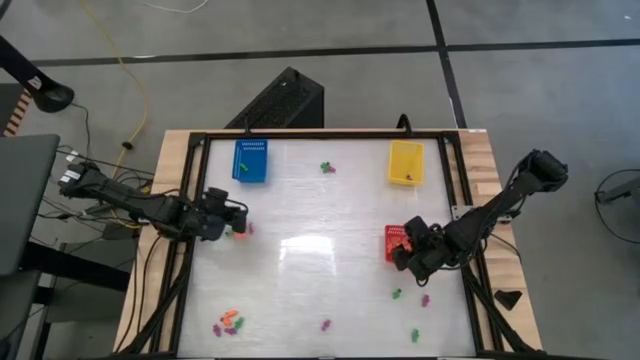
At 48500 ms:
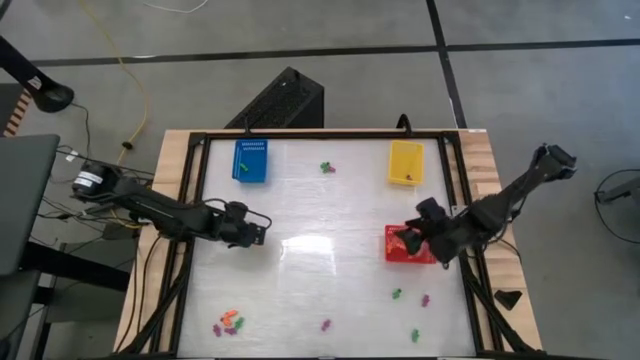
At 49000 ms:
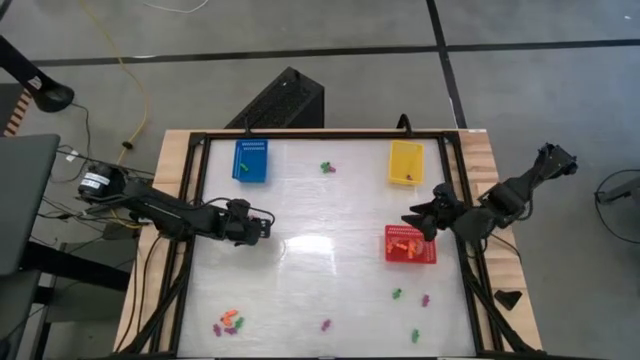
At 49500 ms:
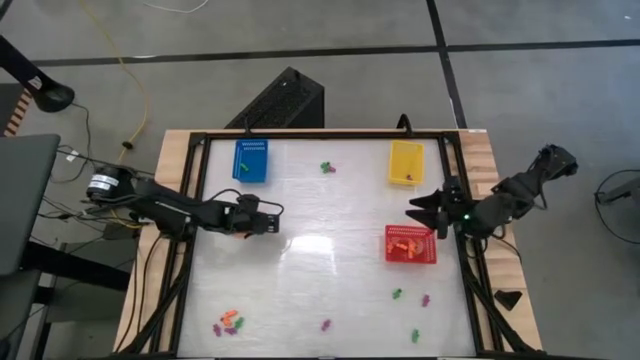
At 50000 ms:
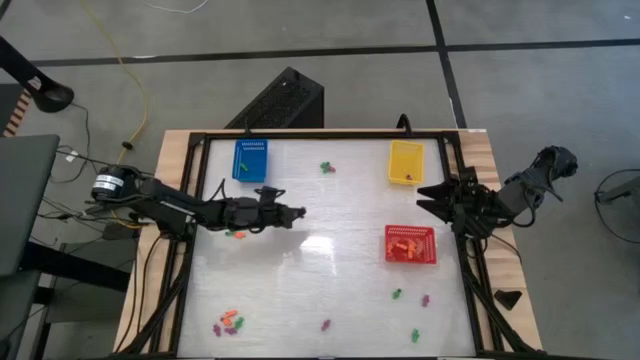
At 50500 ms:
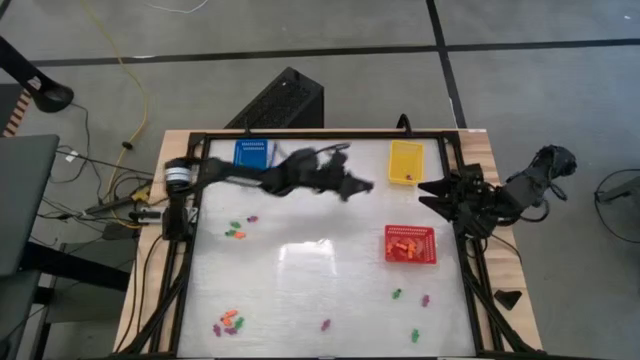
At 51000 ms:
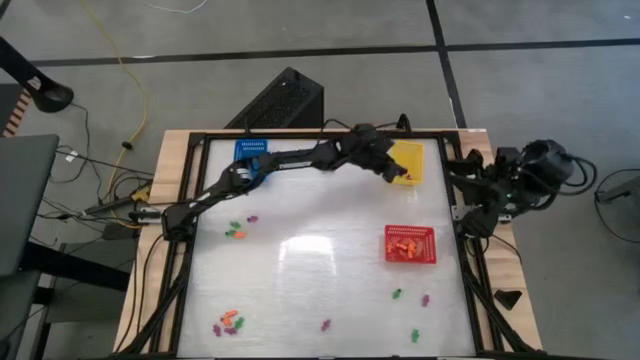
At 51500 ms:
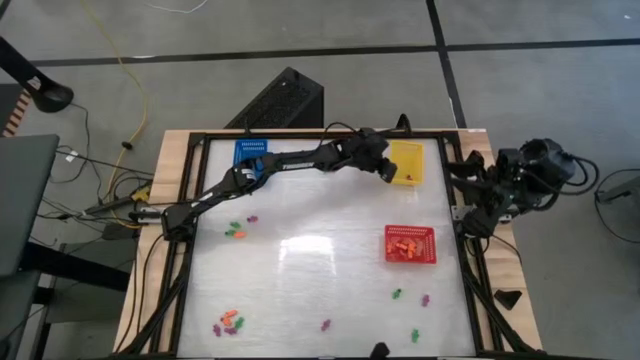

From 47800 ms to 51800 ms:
Task: Sort Halloween decoration
Put the purple skeleton toy into the yellow bin

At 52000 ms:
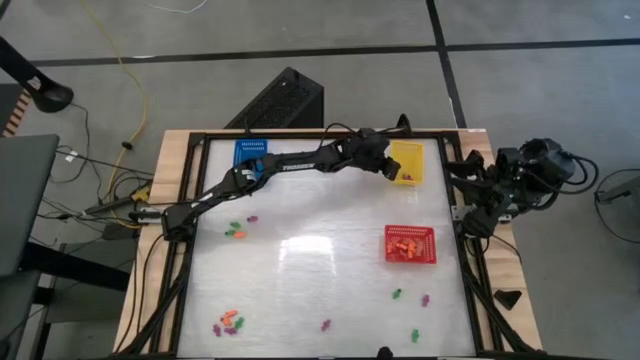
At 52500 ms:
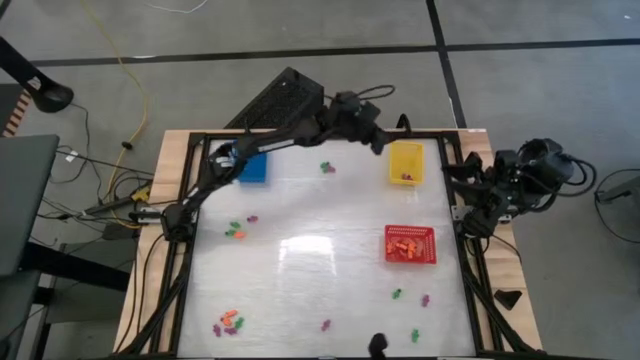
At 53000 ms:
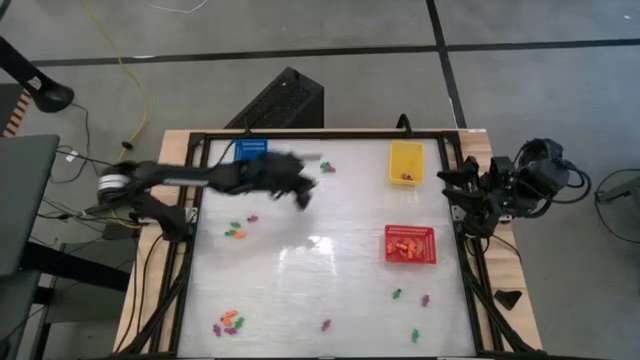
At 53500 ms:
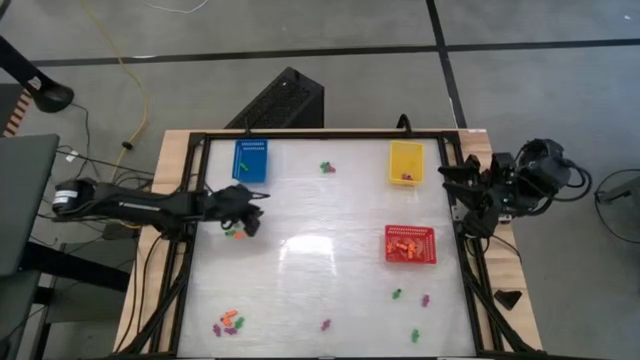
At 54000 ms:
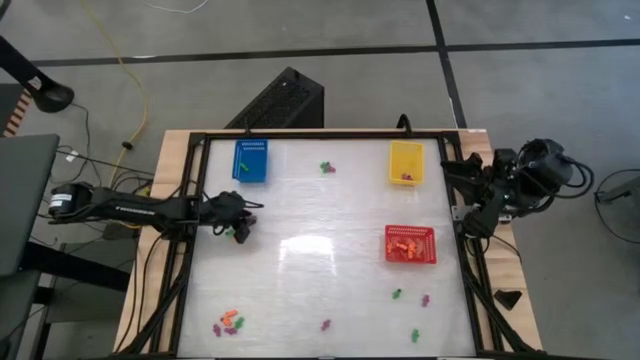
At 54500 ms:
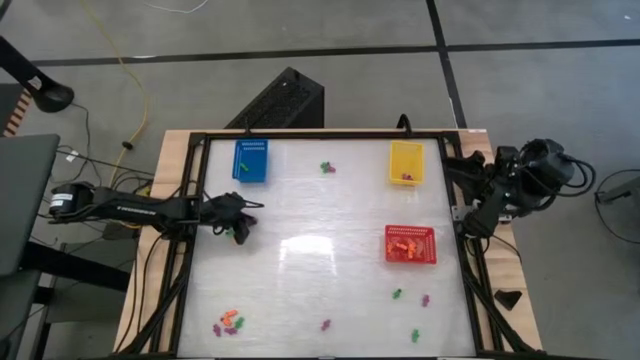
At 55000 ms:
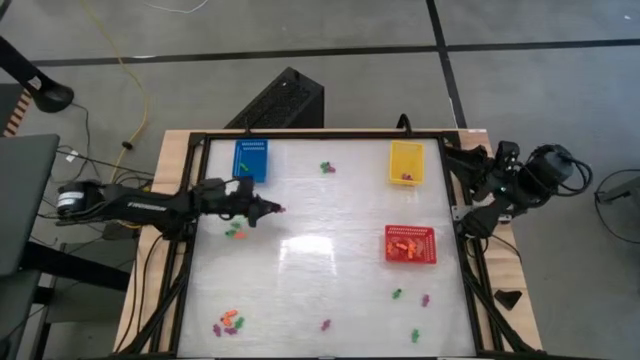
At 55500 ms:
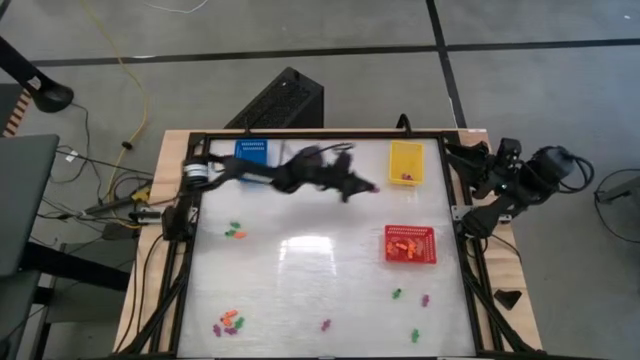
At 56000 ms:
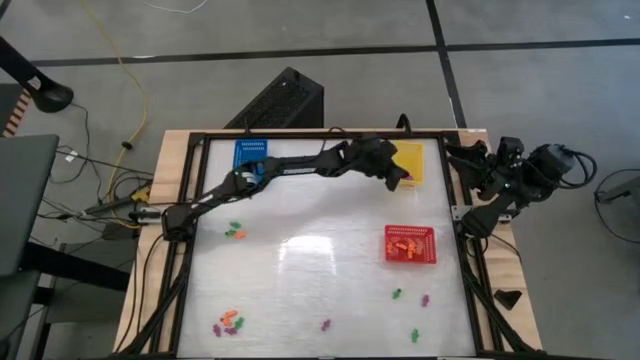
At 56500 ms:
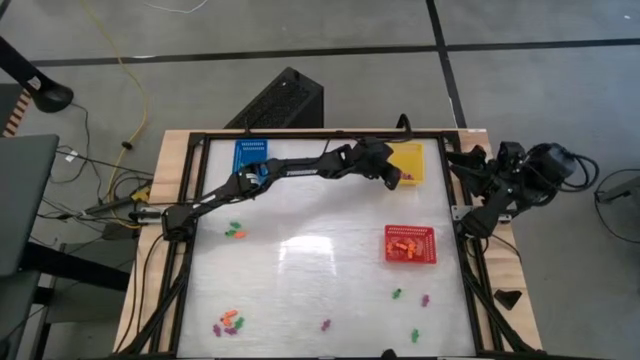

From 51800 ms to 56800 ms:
Put the purple skeleton toy into the yellow bin

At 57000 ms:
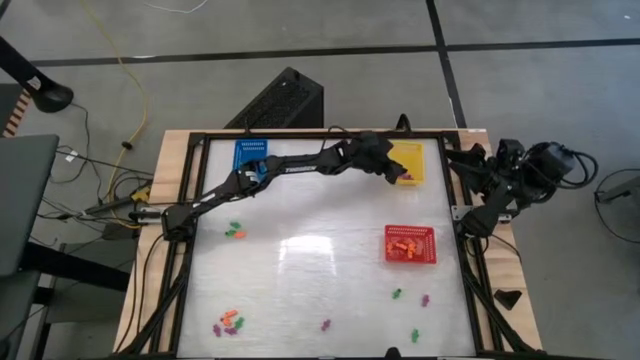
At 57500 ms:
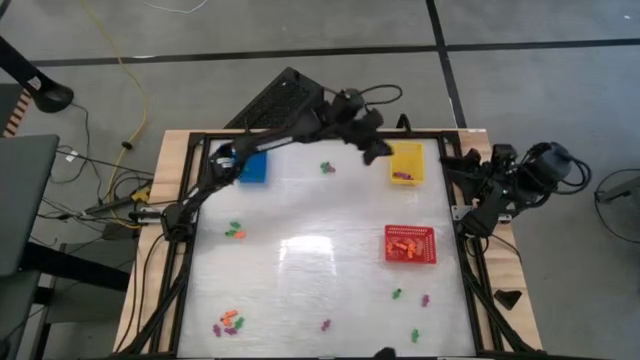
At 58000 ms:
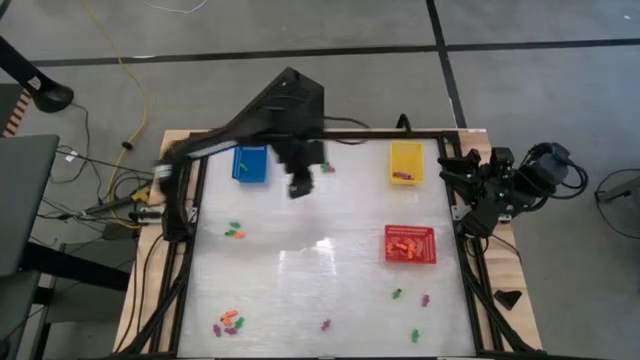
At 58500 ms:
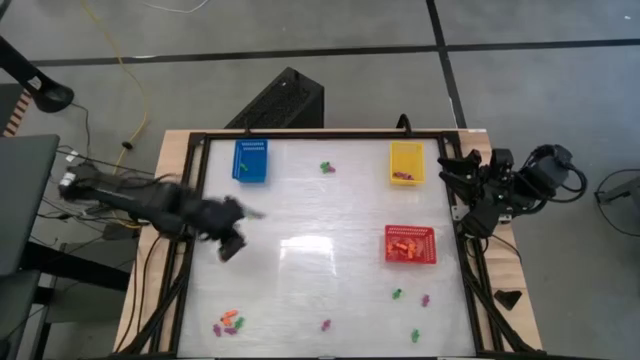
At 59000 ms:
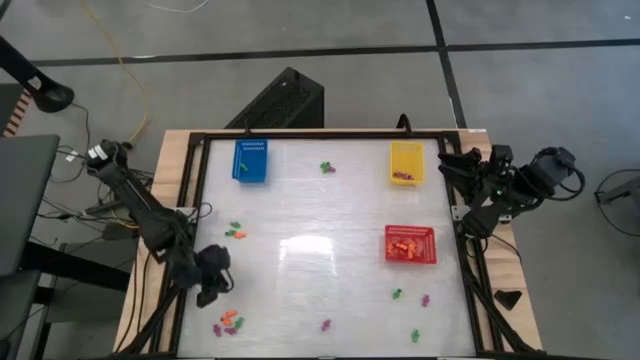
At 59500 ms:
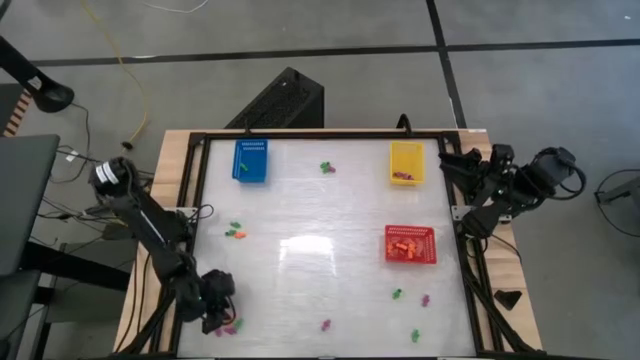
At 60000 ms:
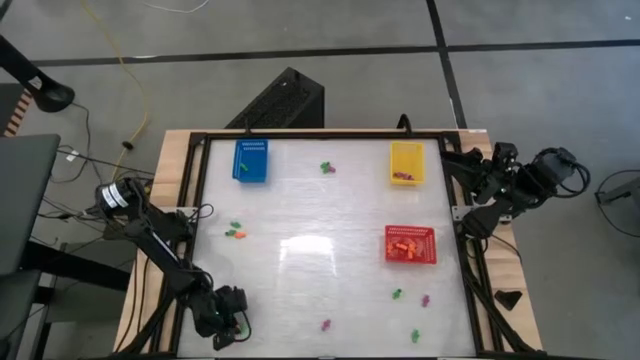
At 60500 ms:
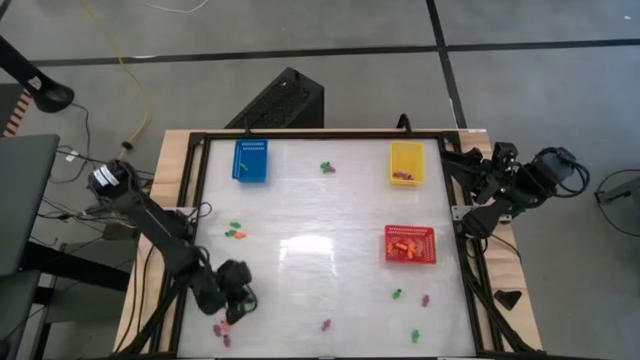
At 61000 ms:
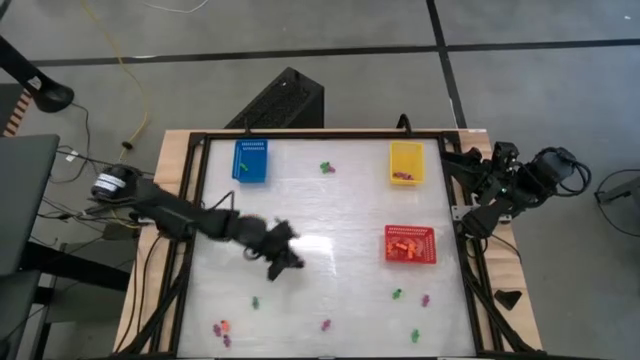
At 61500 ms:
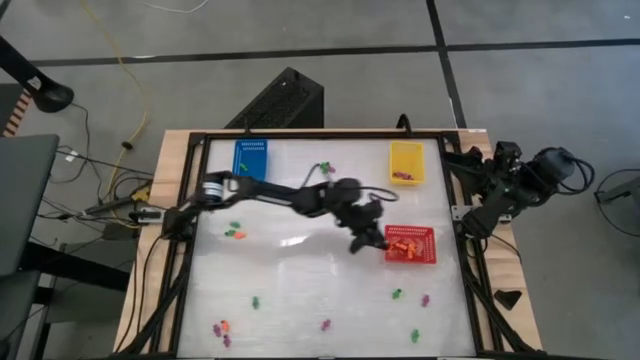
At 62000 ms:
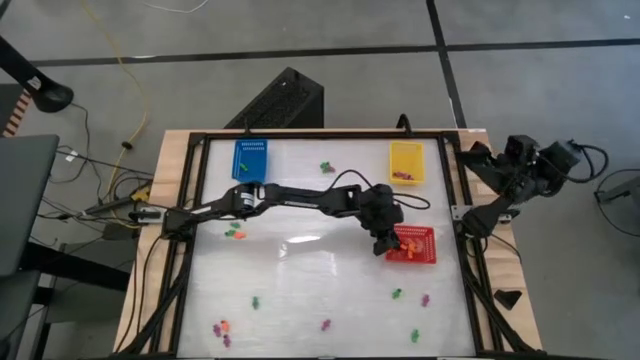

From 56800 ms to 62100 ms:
Put the orange skeleton toy into the red bin

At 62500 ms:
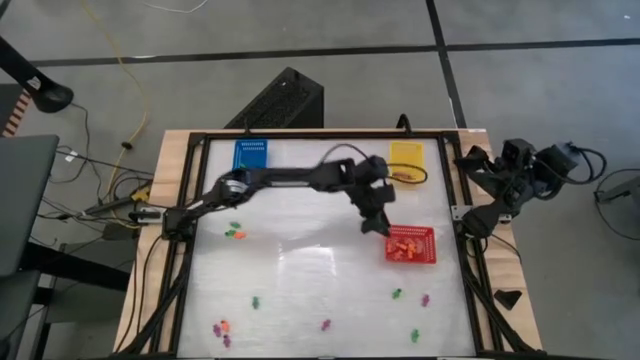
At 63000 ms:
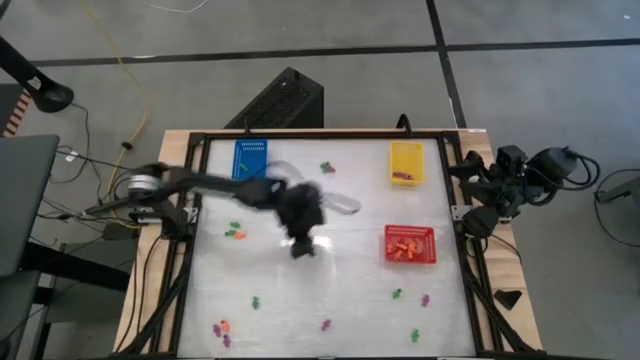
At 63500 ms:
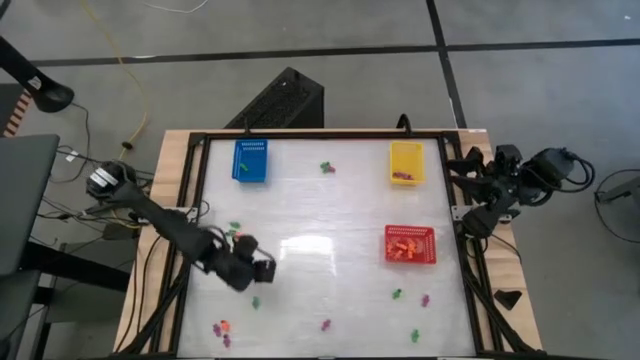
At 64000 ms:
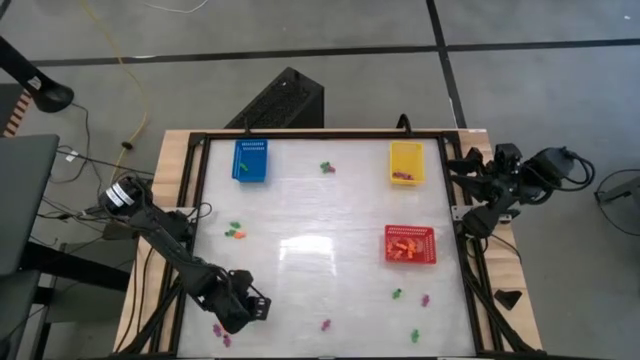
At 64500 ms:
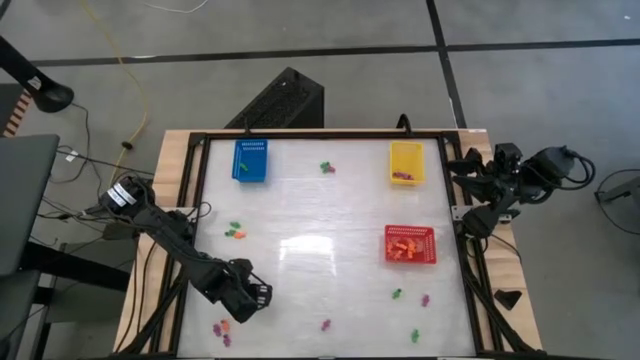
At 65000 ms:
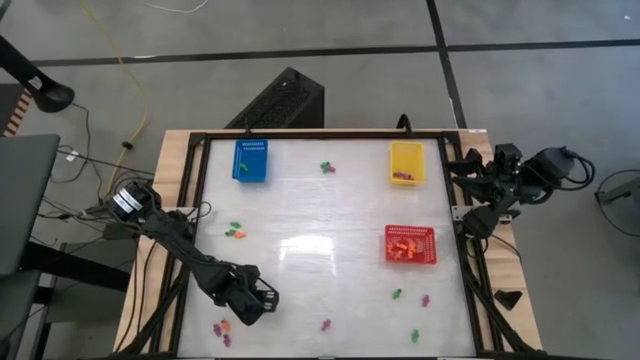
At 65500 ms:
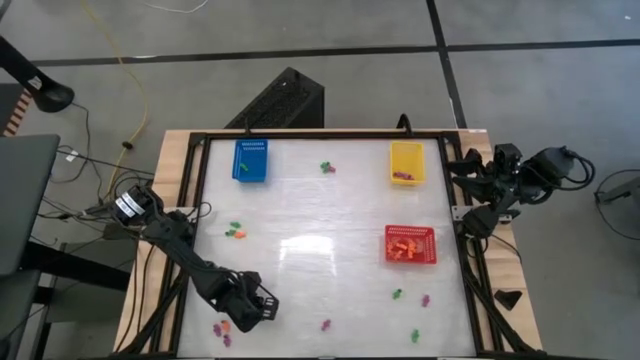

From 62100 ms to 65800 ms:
Put the green skeleton toy into the blue bin

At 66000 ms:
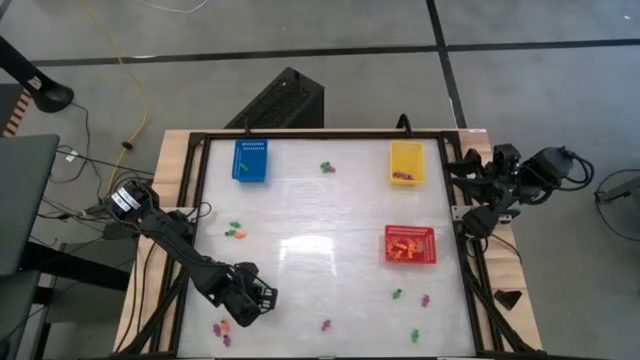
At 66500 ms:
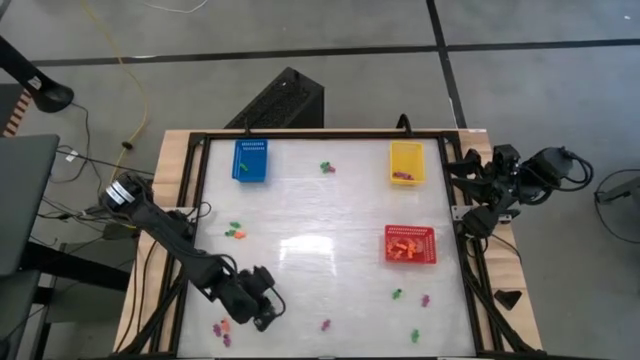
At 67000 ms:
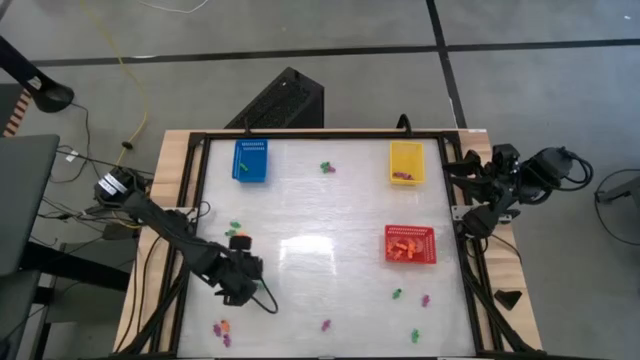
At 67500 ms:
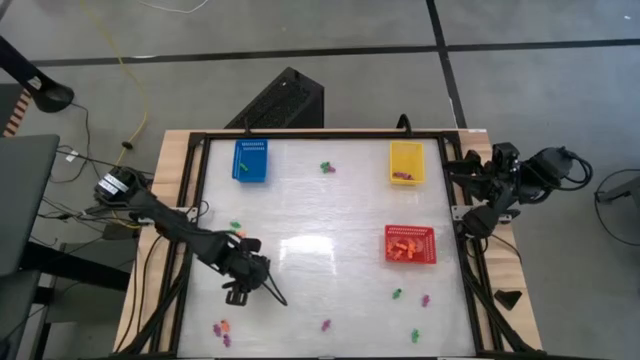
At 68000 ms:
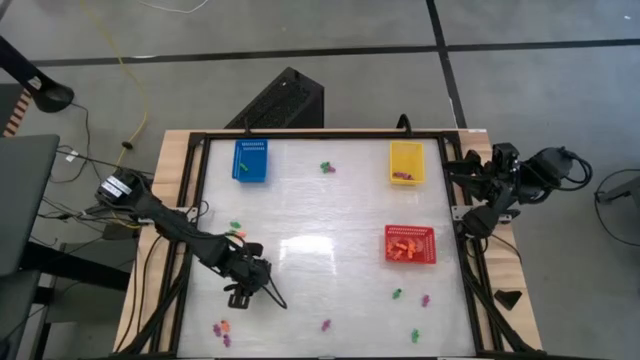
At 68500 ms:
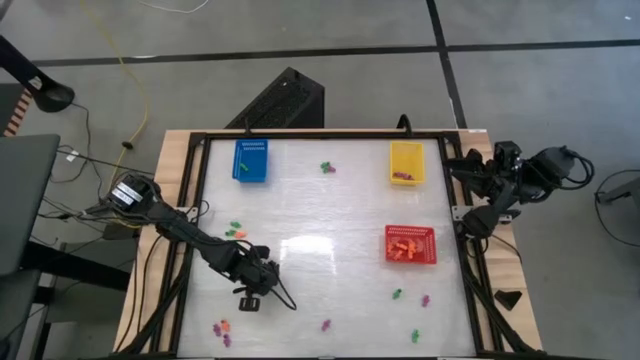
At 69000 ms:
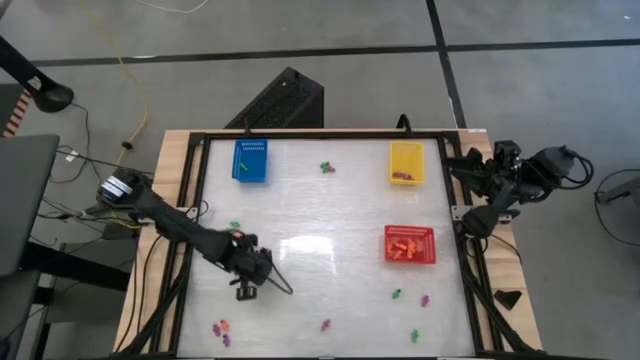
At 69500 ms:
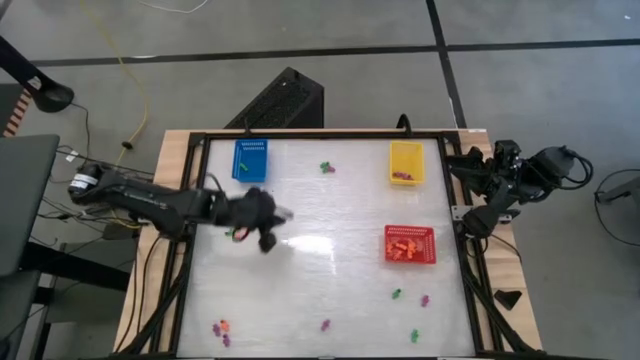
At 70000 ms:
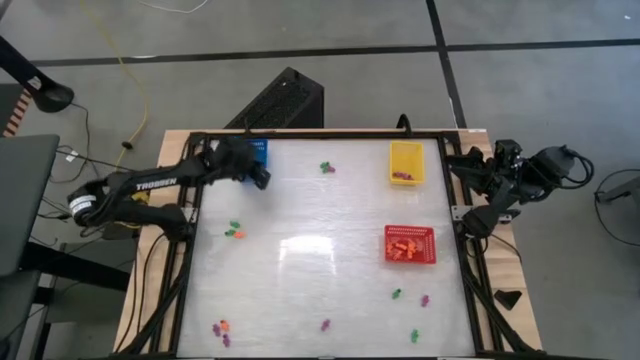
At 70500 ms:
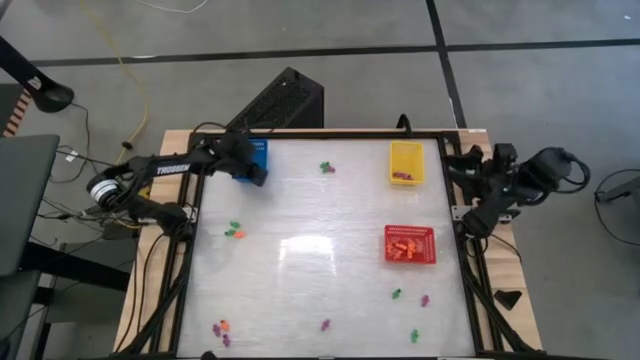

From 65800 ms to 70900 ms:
Put the green skeleton toy into the blue bin
